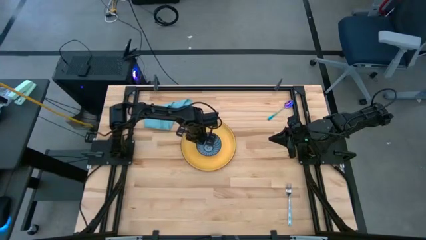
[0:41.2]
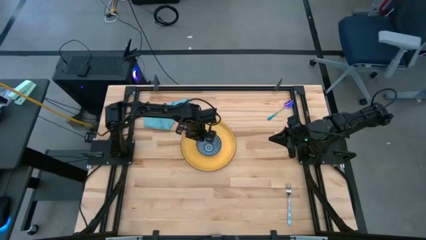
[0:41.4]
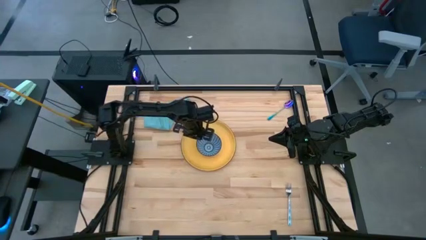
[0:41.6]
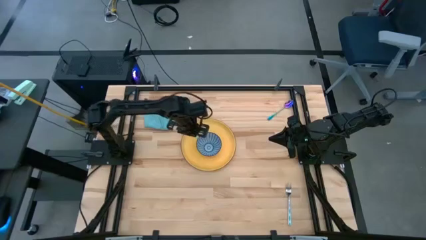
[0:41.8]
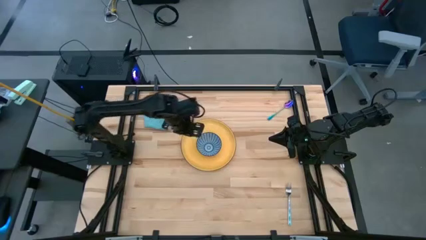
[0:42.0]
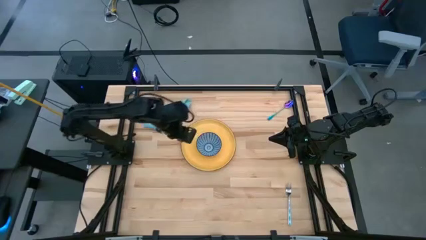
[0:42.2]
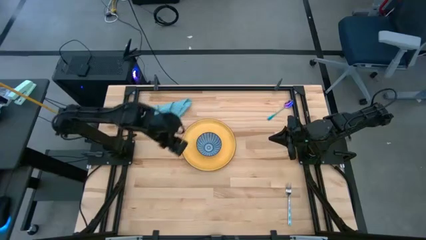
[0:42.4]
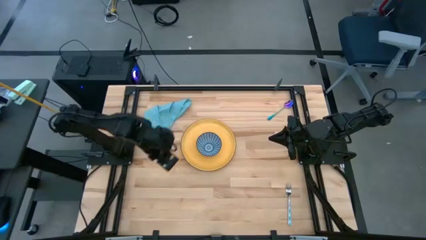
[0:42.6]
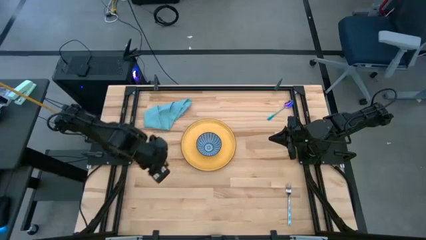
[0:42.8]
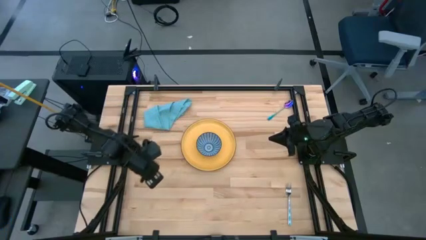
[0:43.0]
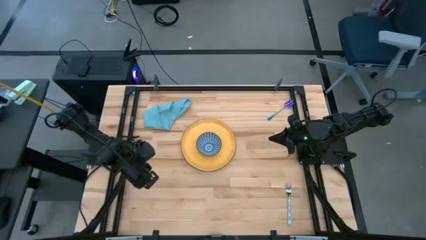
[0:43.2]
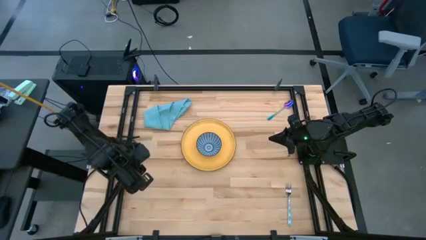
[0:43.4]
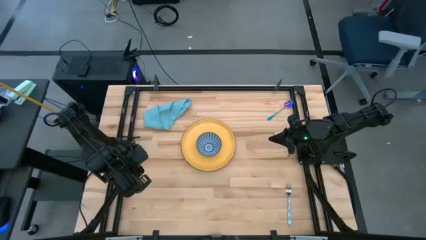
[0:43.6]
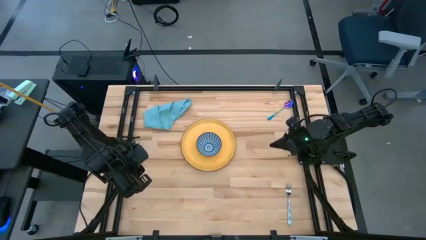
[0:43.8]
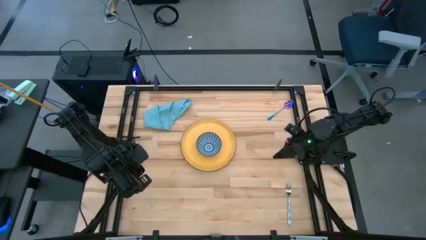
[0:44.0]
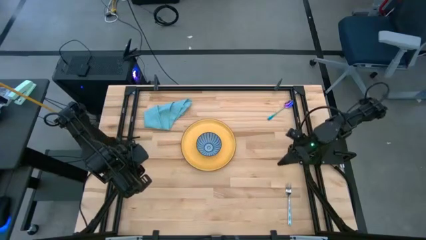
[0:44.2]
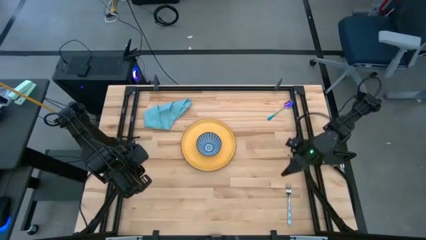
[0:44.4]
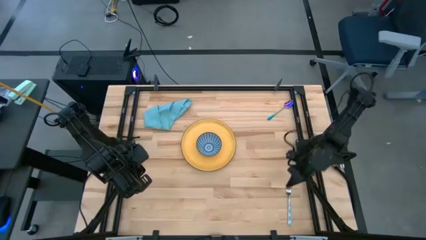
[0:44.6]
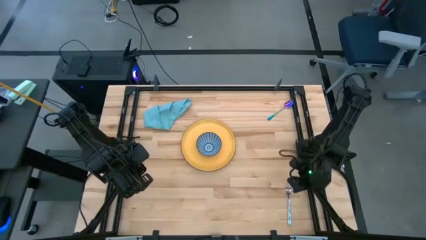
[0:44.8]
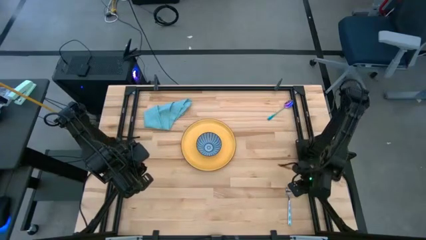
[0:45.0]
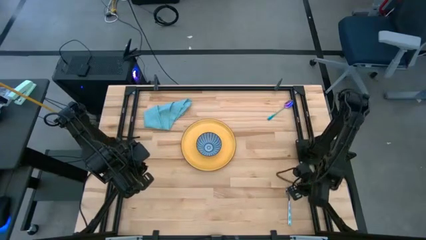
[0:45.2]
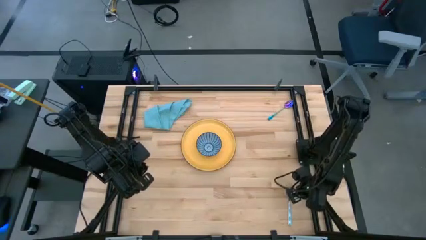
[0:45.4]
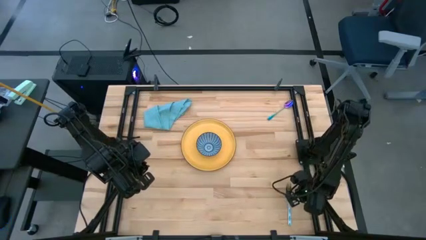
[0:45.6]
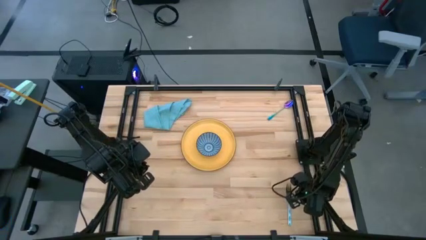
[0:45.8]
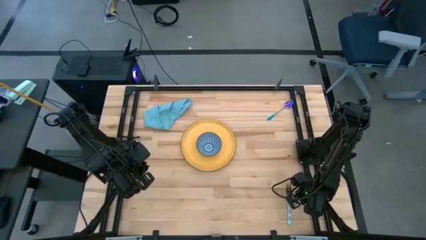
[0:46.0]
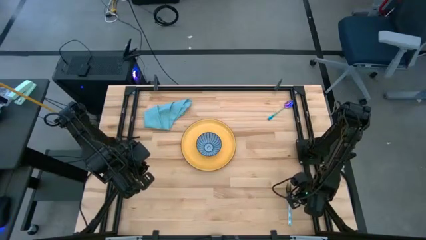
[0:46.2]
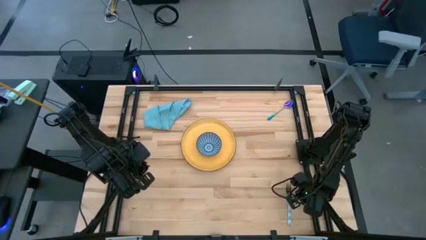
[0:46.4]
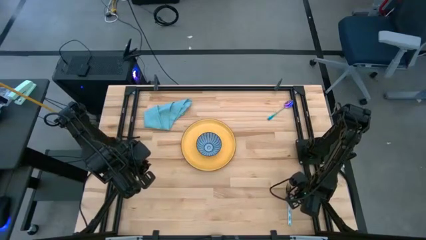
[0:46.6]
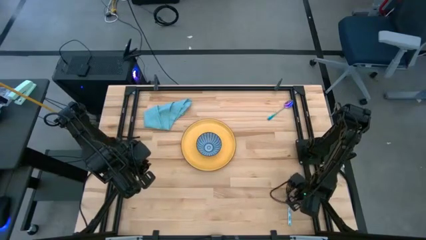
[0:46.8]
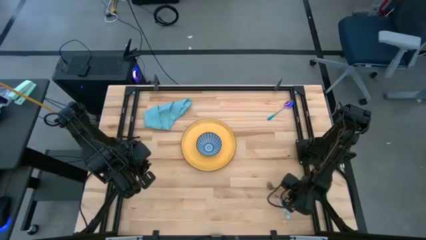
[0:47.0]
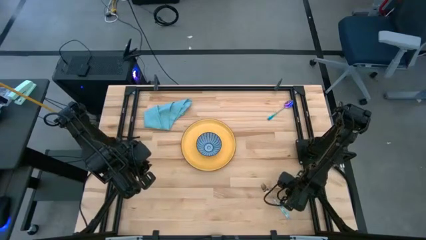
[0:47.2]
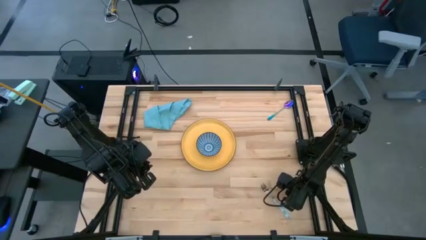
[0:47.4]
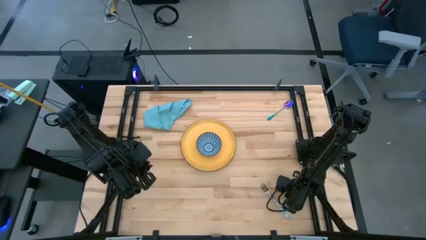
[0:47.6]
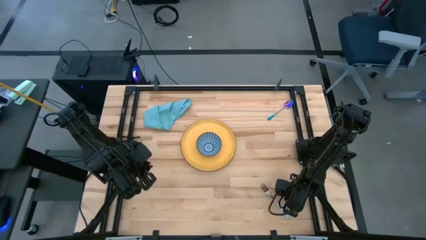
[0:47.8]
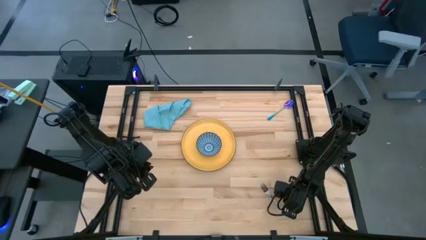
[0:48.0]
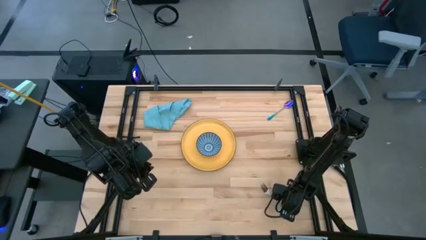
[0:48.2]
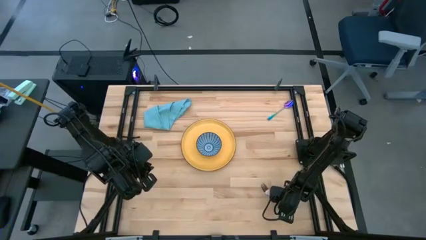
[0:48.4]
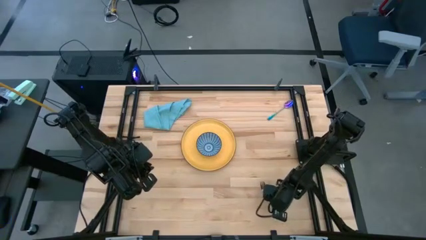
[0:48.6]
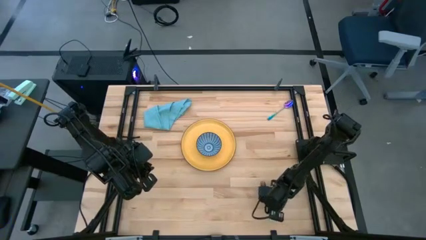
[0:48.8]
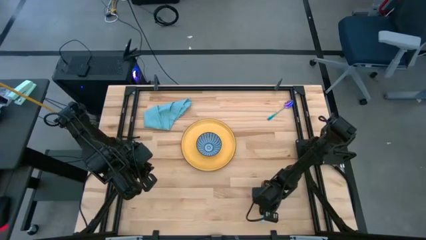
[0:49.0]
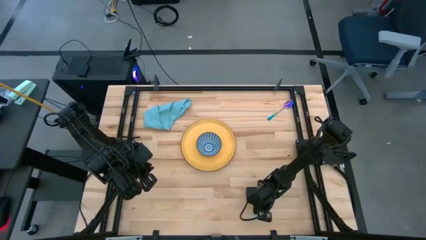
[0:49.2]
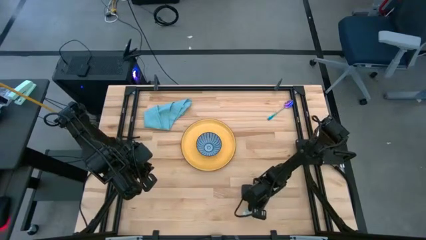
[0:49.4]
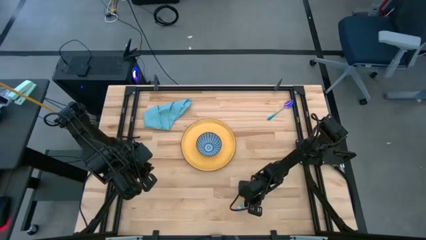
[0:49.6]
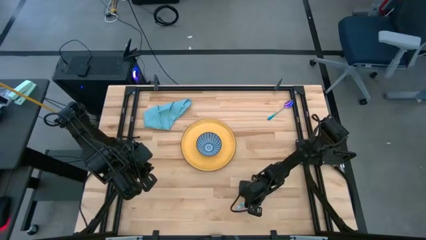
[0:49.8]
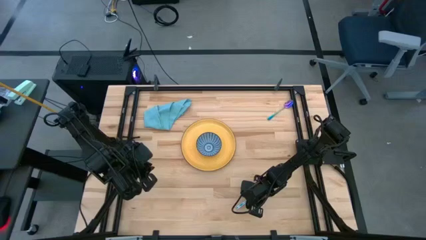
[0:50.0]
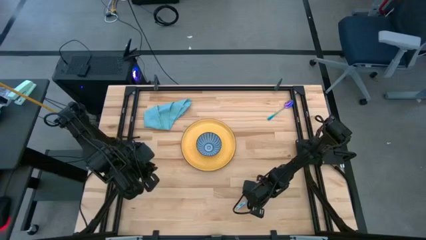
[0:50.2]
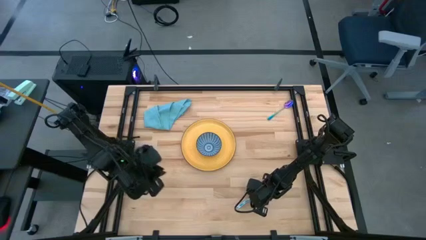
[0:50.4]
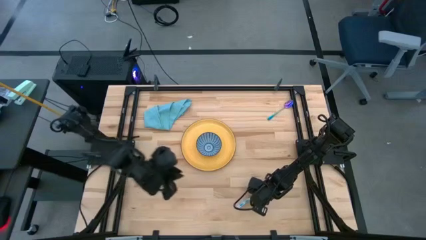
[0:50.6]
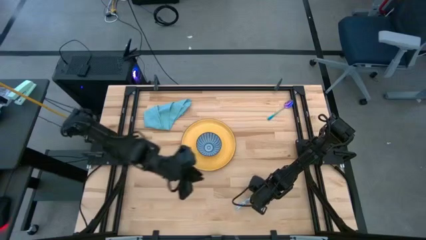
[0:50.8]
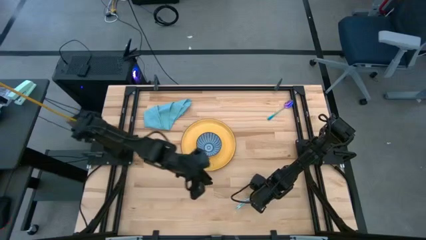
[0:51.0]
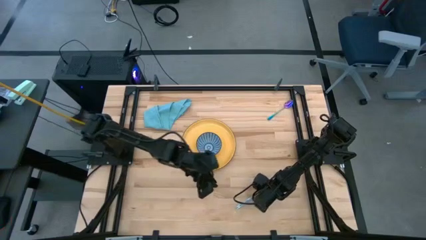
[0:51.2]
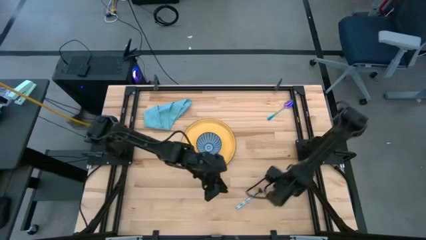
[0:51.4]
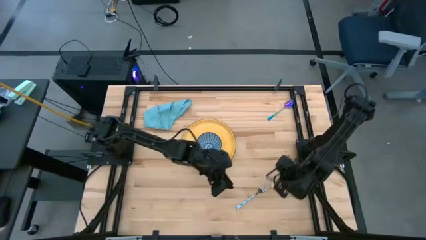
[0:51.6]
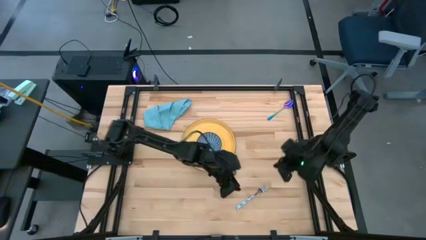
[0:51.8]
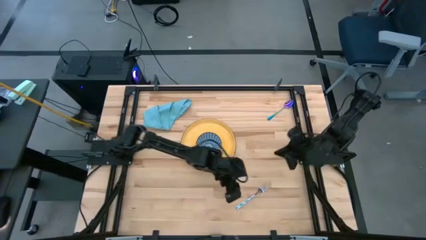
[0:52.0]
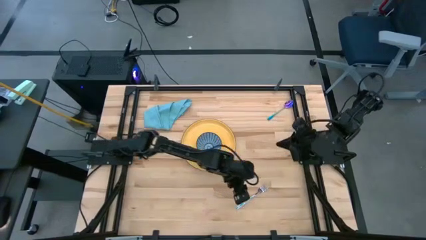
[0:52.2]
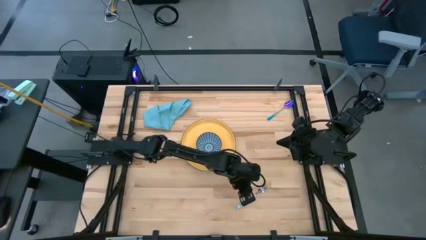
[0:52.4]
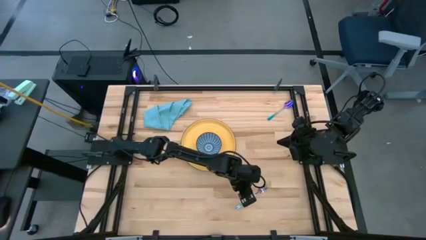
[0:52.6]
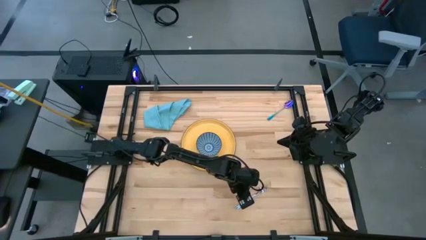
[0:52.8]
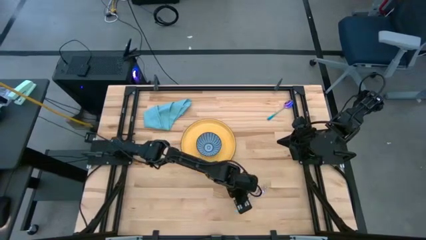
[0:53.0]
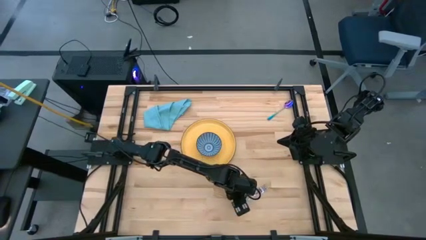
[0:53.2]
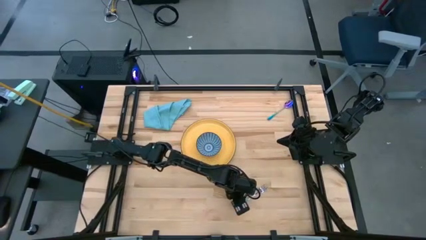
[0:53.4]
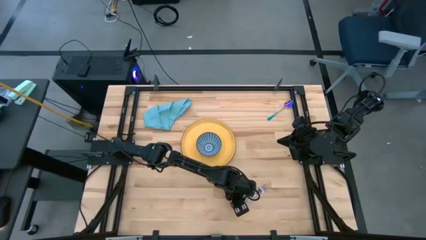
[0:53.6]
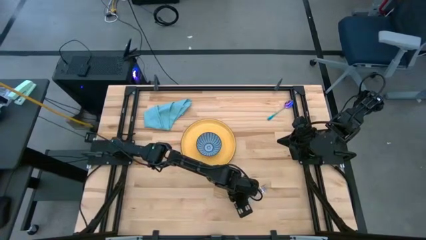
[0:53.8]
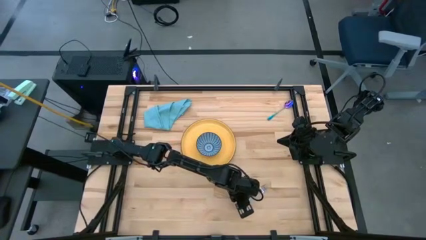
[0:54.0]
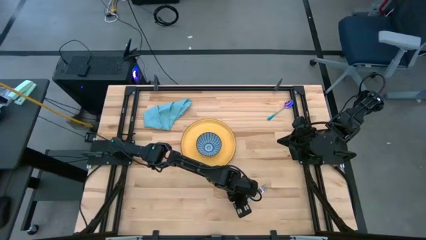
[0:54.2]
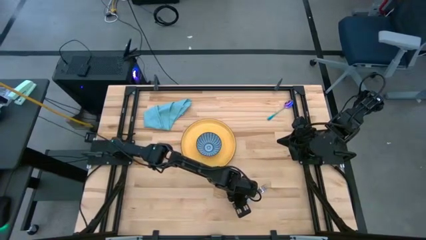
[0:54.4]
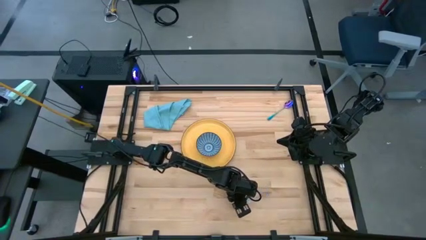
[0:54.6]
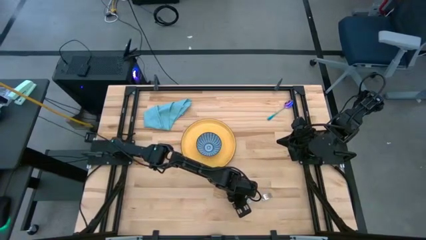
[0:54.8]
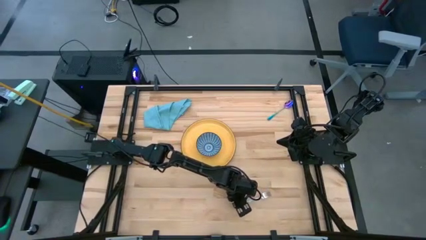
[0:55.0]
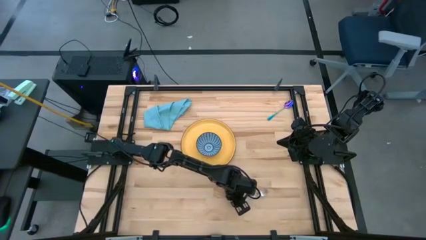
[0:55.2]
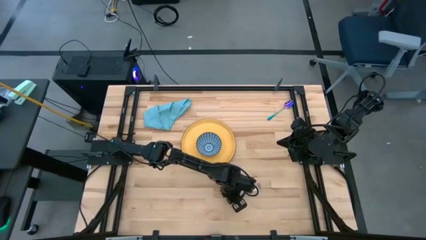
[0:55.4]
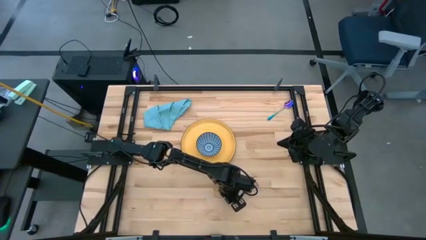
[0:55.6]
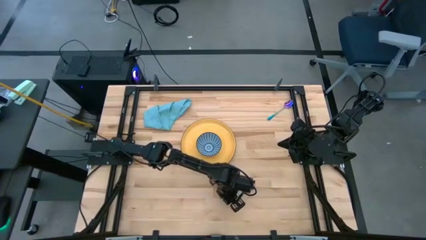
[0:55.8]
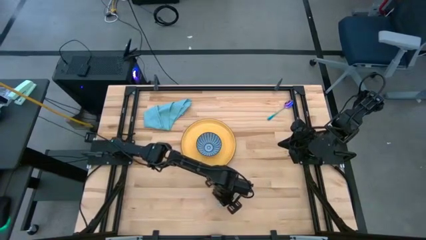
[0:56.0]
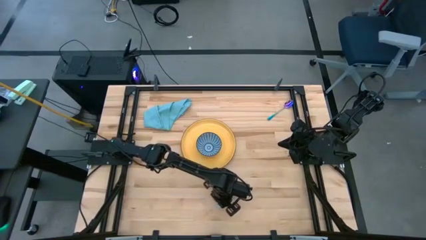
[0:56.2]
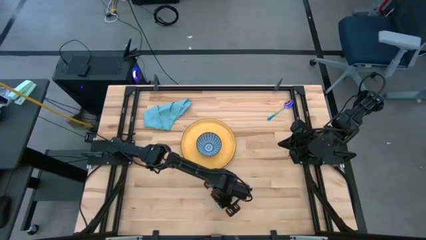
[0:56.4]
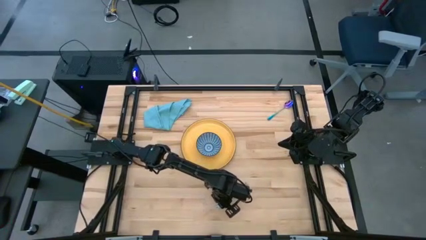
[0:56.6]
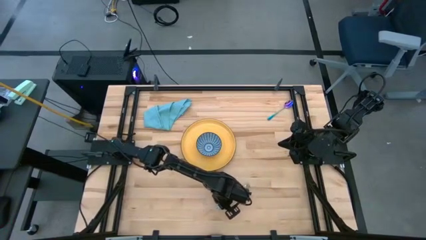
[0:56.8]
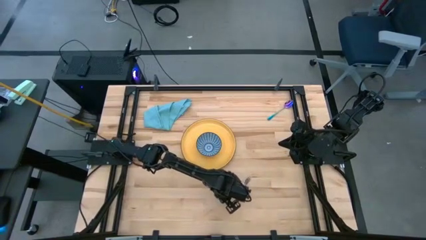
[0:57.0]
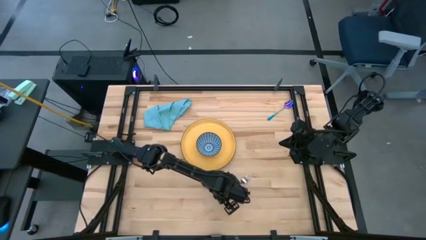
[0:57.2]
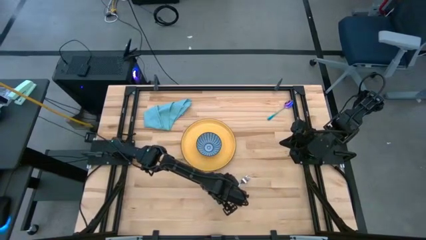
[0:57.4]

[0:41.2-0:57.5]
Task: Set table place
Put the blue fork to the left of the yellow plate
